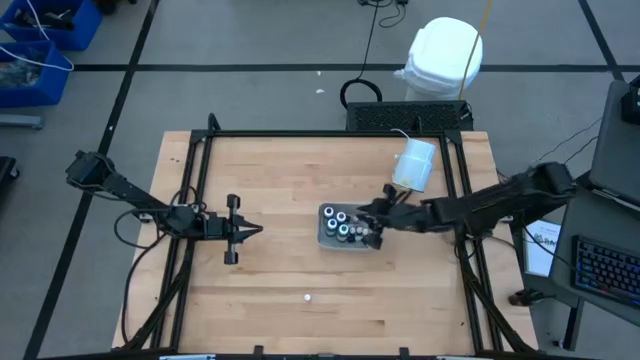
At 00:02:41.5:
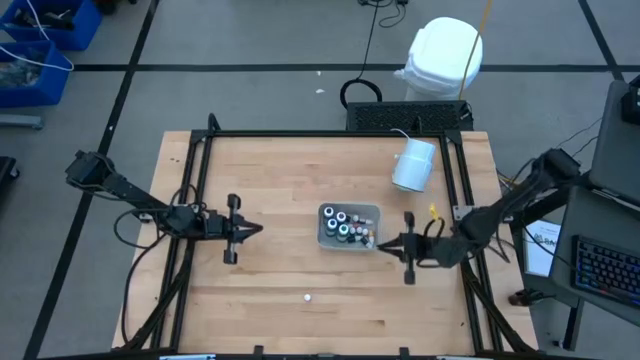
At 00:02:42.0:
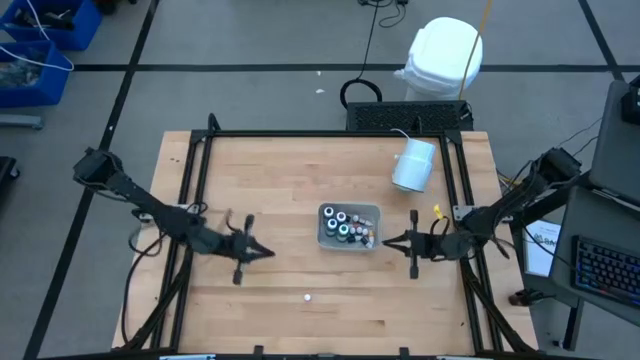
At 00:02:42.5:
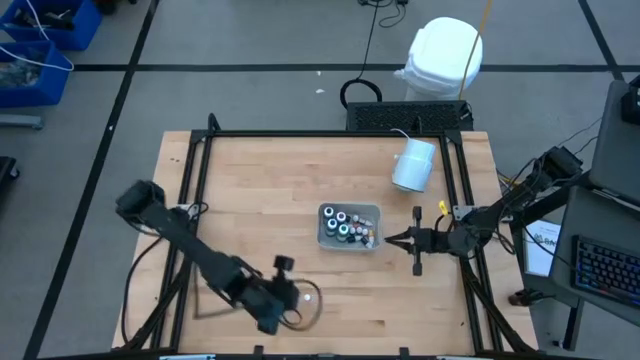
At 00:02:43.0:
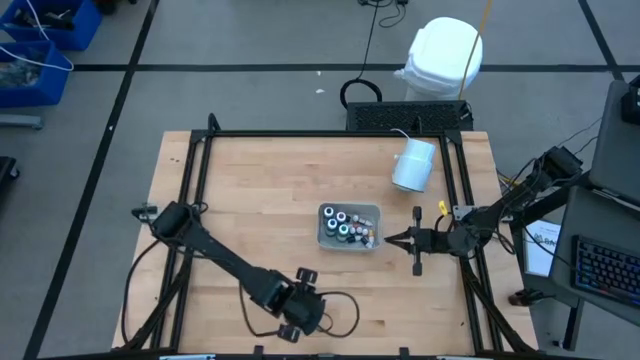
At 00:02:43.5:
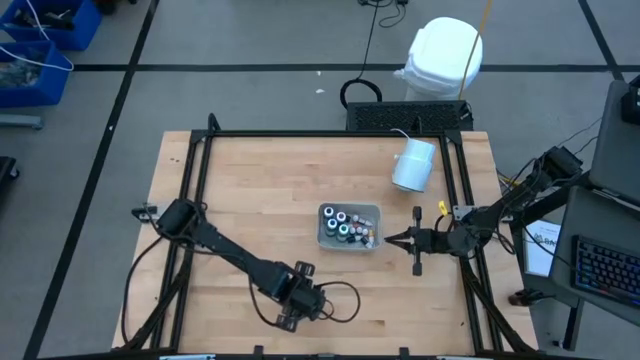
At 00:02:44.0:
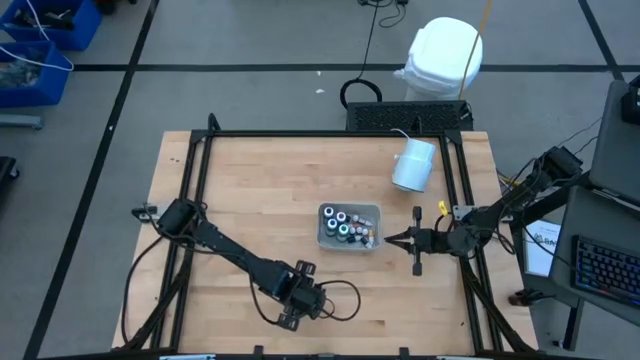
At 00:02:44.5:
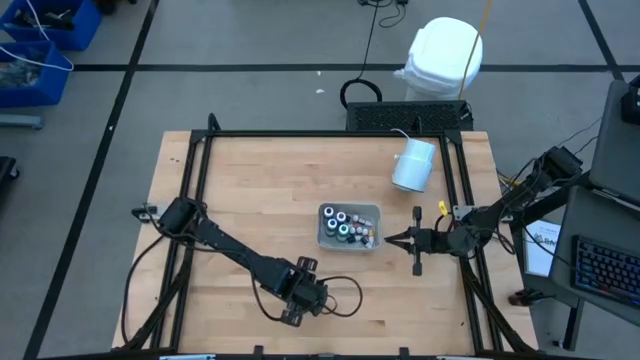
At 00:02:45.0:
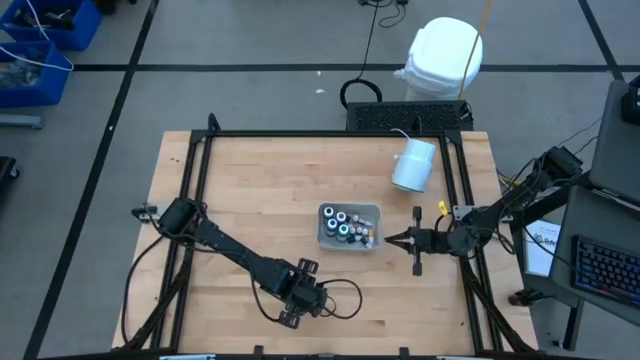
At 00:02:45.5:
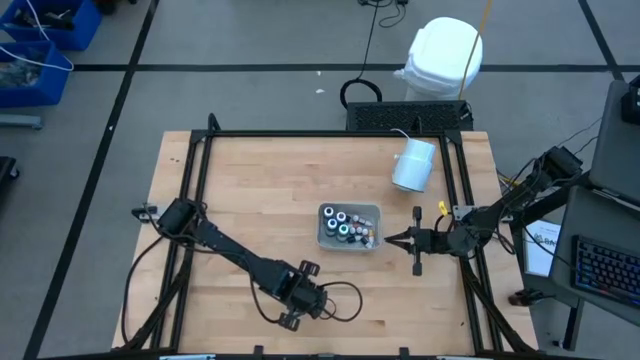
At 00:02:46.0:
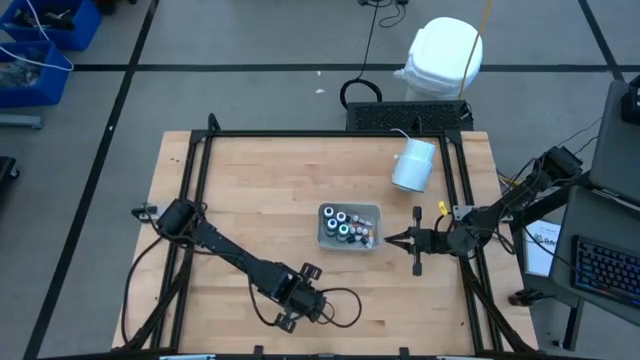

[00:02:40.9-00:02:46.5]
Task: Pick & Place food coloring
Put the small yellow bottle into the gray bin

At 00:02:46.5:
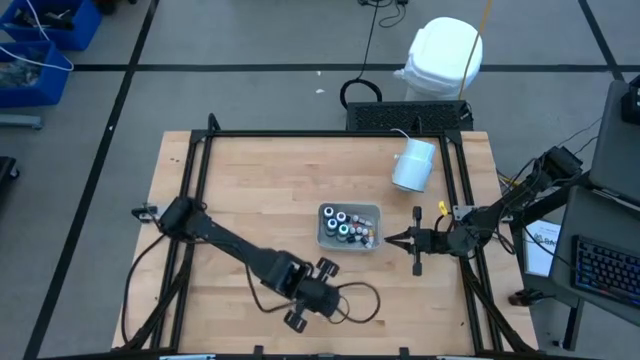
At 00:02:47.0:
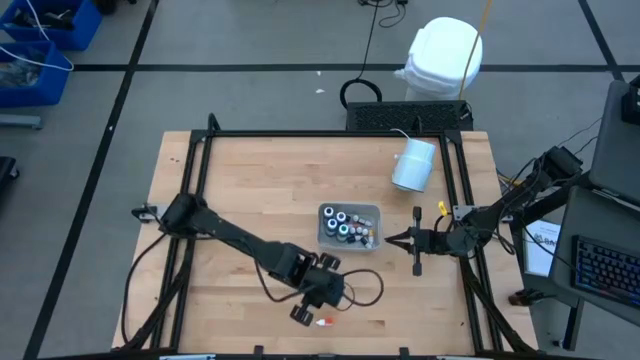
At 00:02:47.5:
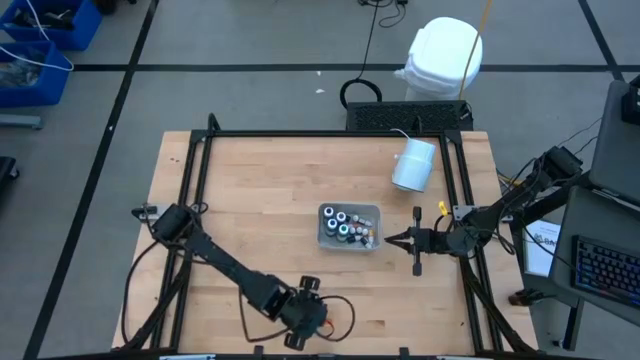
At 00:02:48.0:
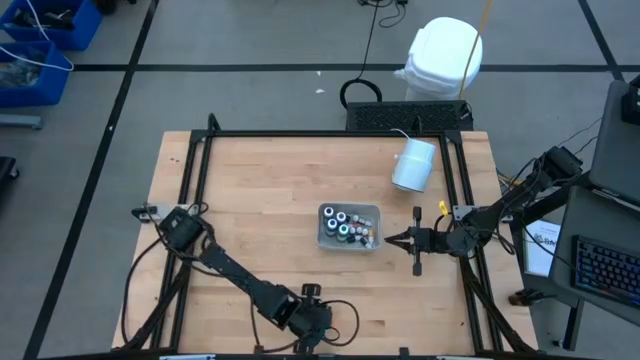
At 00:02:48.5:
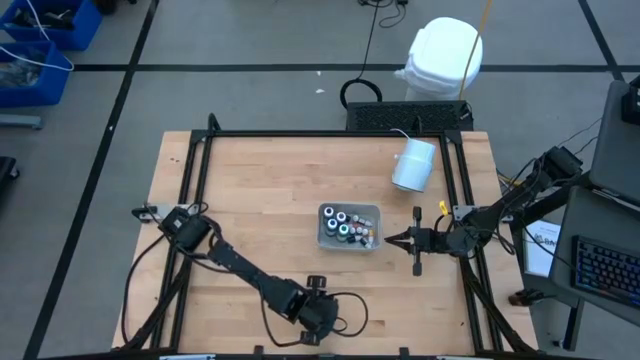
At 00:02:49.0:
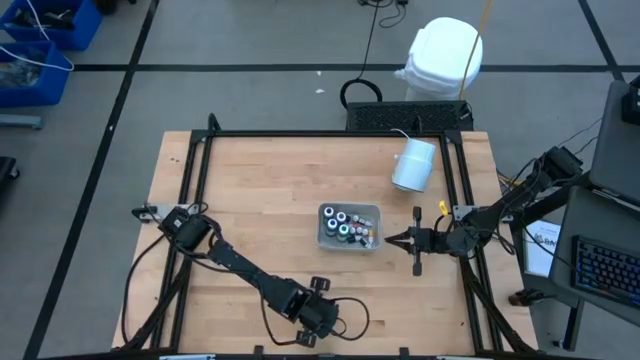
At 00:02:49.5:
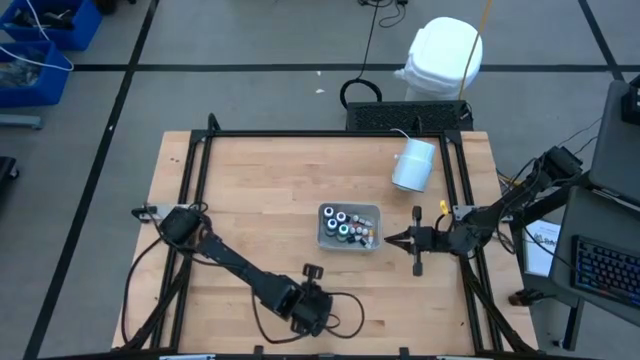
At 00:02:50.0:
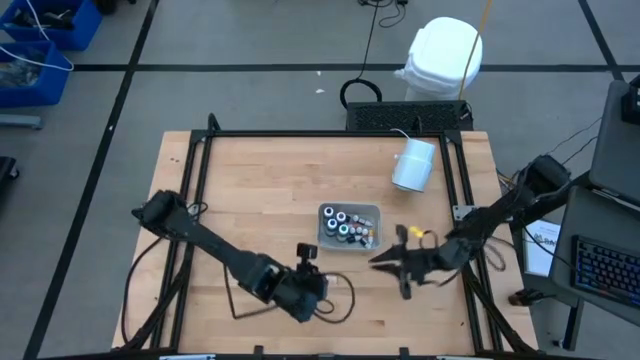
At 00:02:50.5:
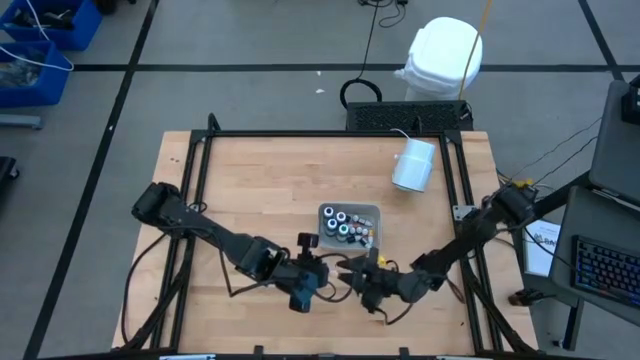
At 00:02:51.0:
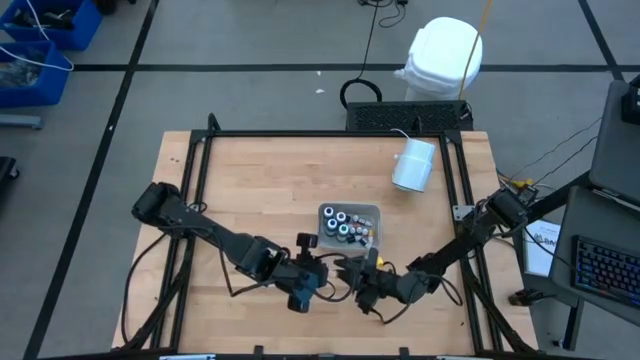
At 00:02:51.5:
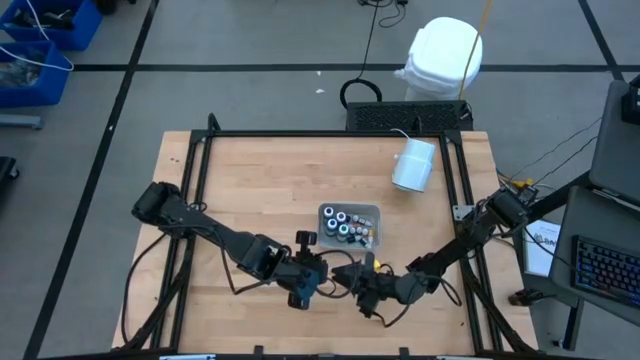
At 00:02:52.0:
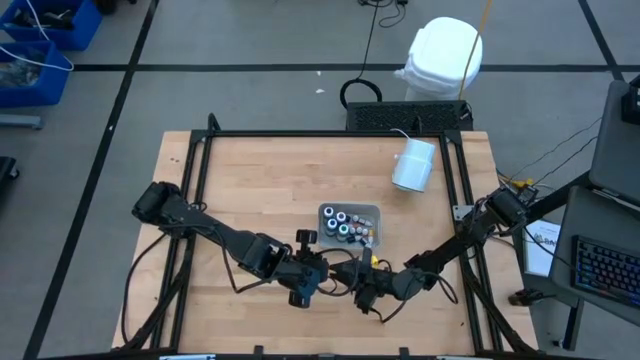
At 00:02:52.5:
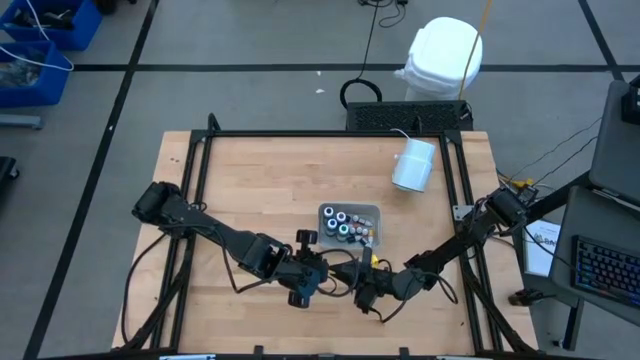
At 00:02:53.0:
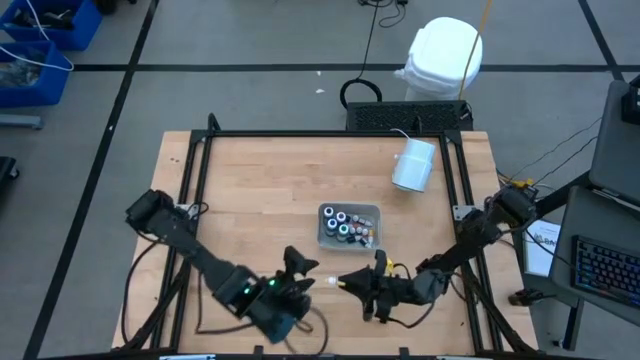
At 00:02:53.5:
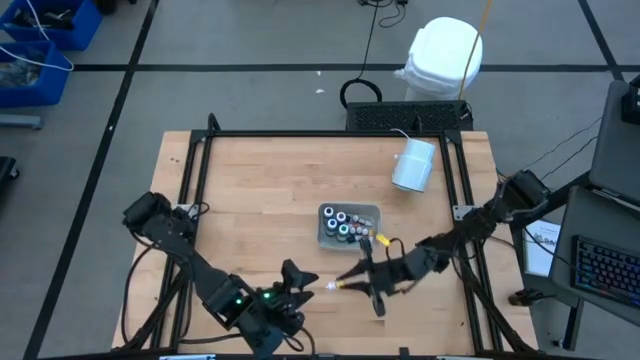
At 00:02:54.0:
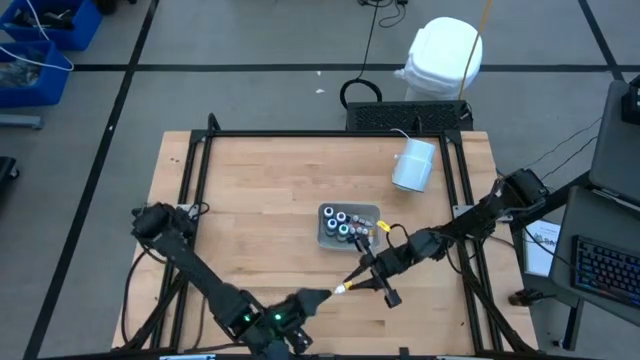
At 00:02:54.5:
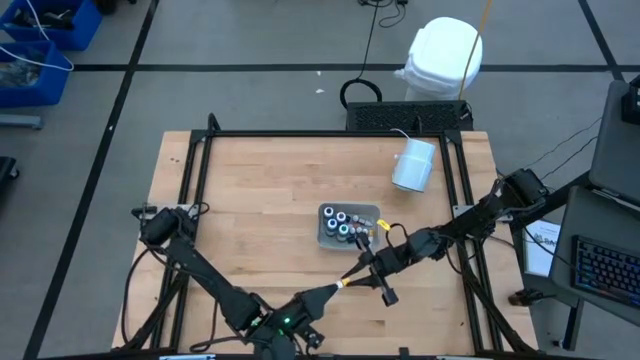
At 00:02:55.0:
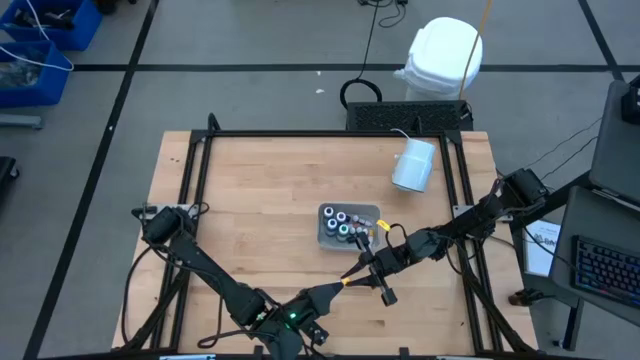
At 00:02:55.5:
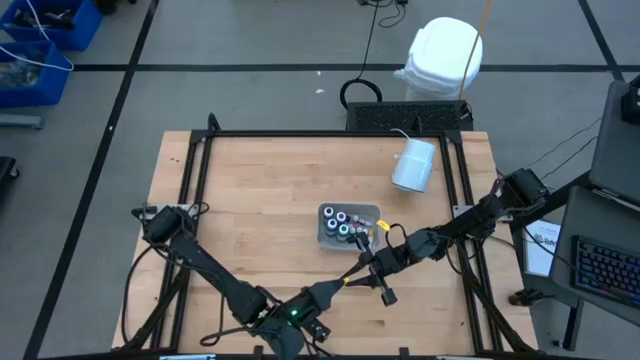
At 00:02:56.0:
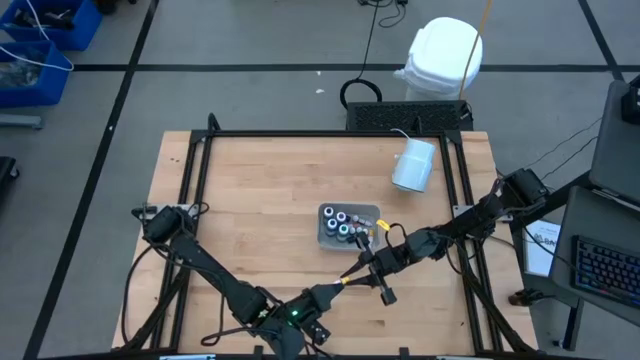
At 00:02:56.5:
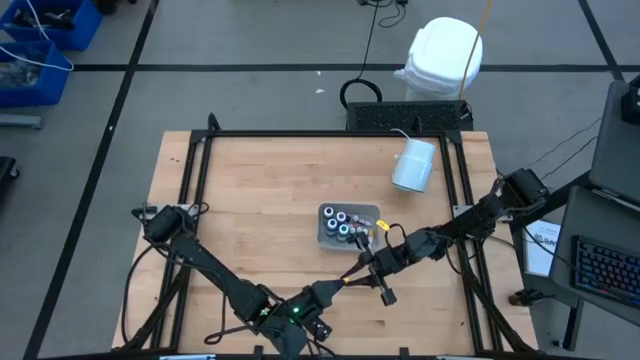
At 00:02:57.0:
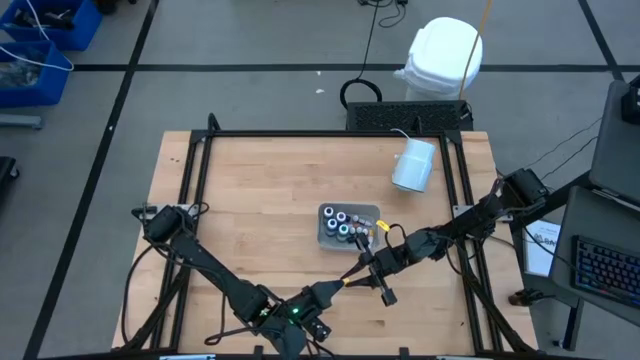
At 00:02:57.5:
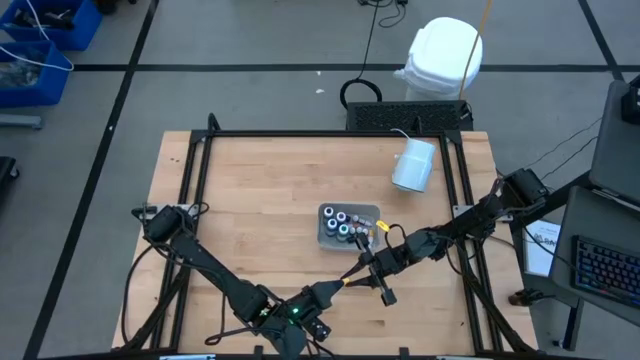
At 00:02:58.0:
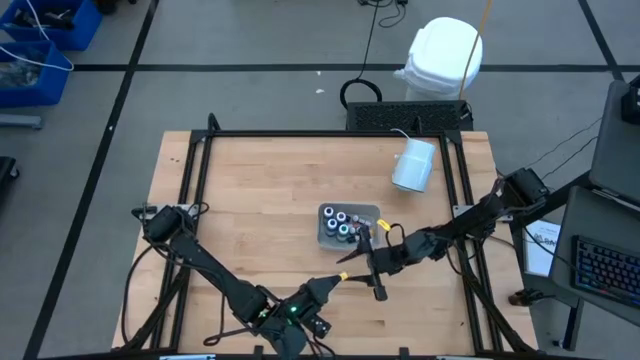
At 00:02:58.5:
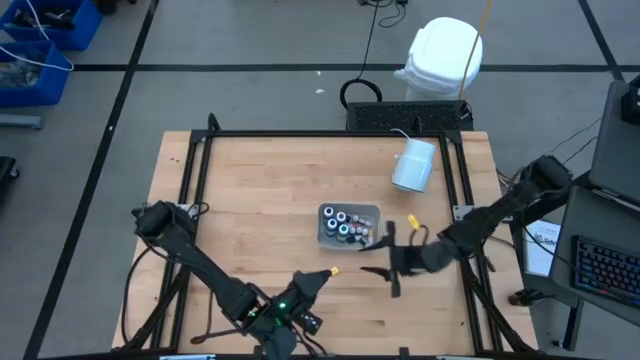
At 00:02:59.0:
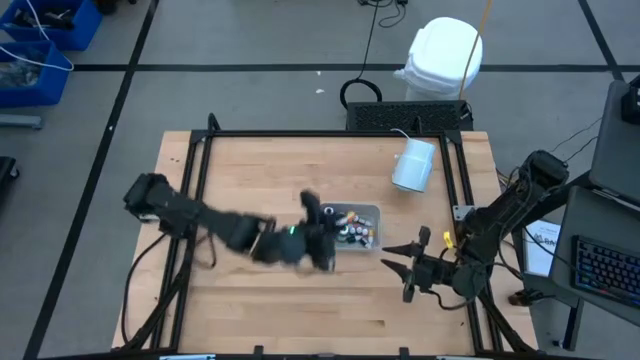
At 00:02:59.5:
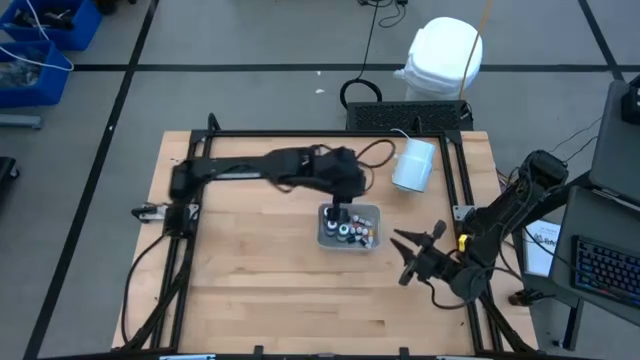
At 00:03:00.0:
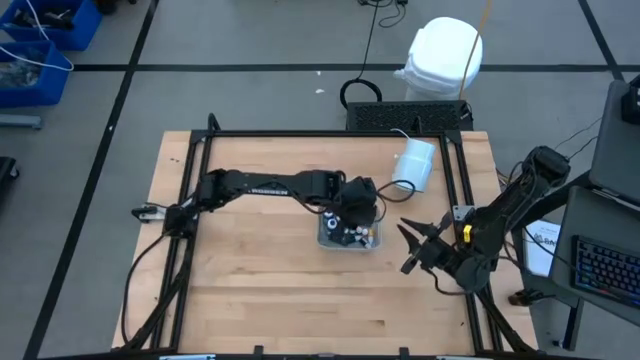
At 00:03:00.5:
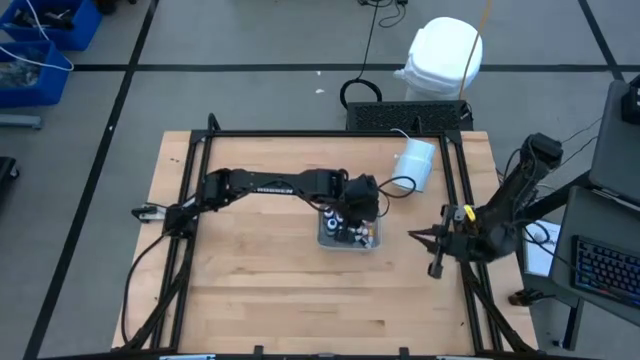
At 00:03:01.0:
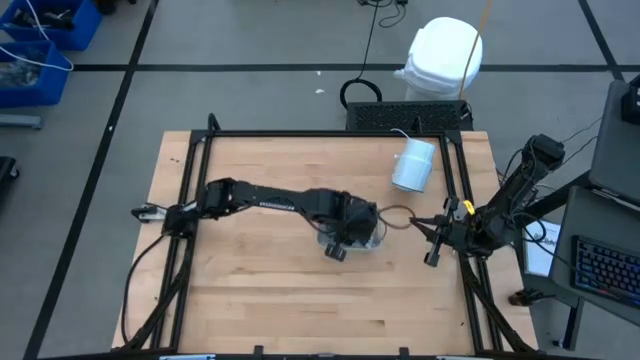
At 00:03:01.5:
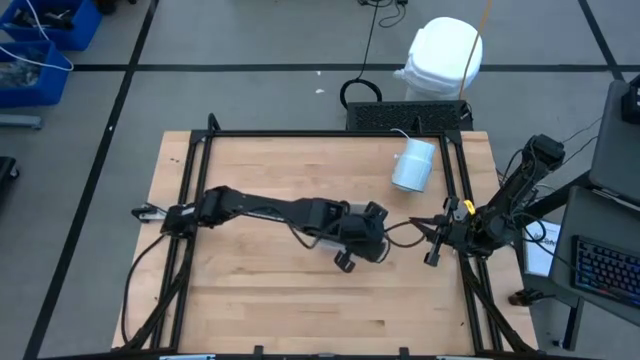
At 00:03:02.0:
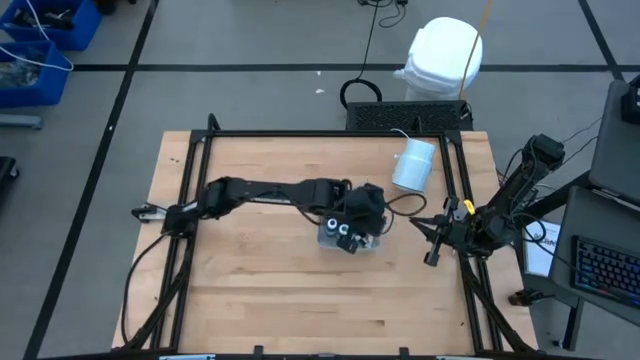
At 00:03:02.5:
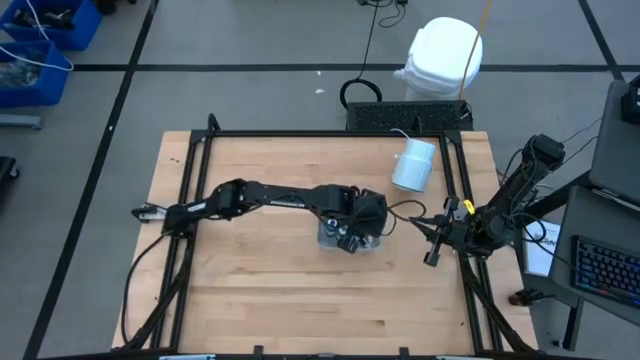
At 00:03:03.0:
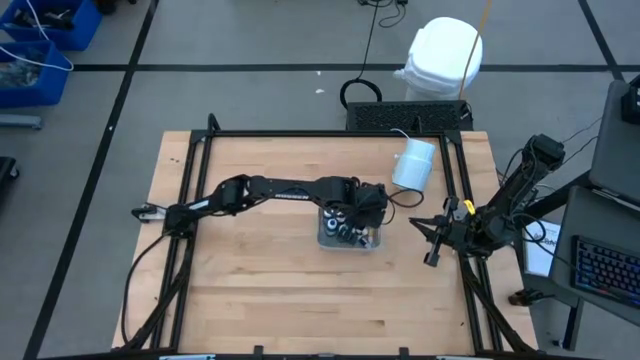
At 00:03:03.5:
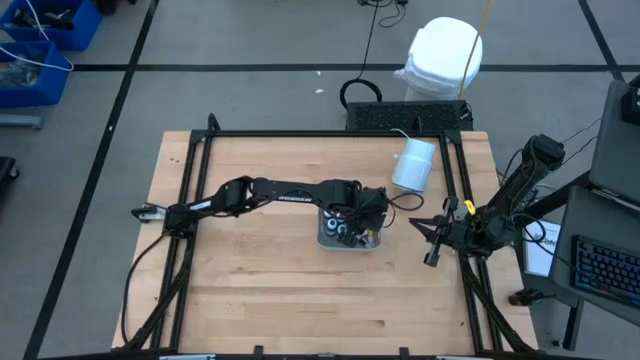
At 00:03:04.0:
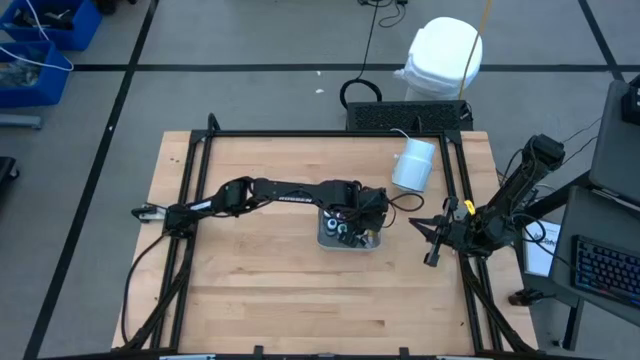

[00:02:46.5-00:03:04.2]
Put the small yellow bottle into the gray bin
